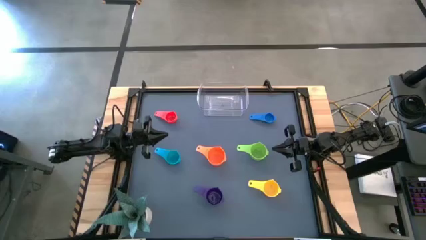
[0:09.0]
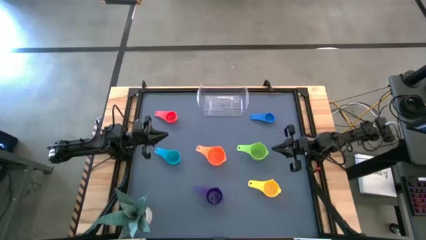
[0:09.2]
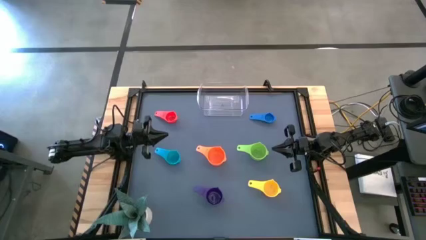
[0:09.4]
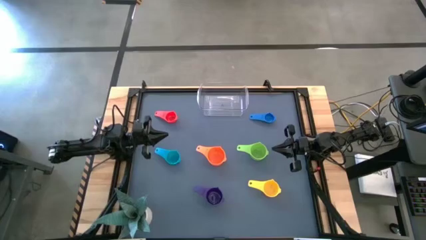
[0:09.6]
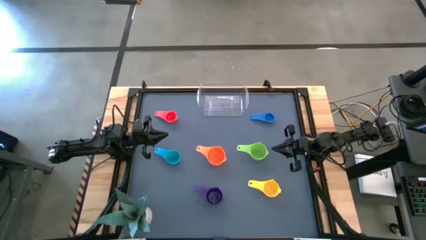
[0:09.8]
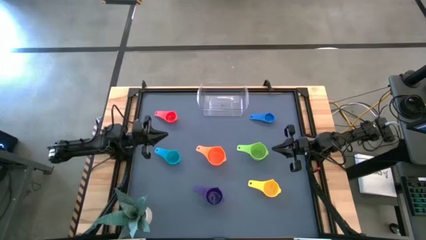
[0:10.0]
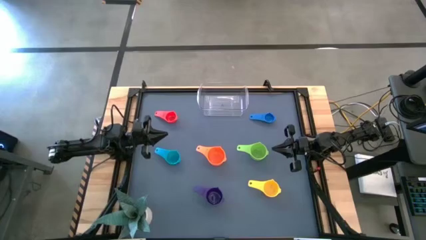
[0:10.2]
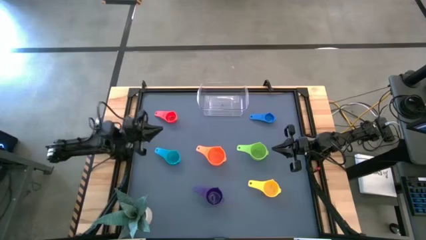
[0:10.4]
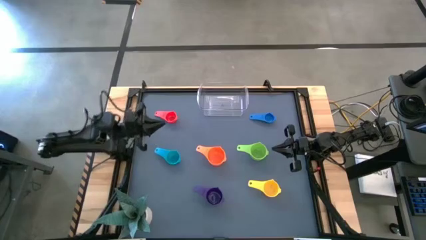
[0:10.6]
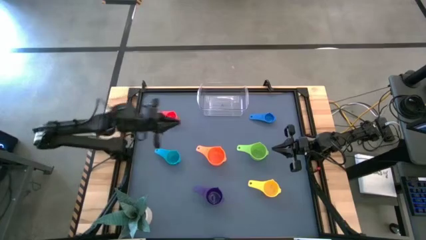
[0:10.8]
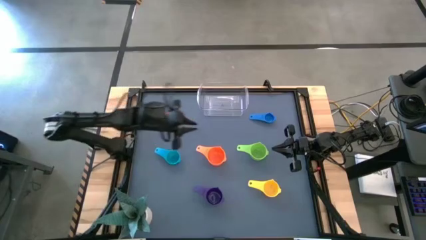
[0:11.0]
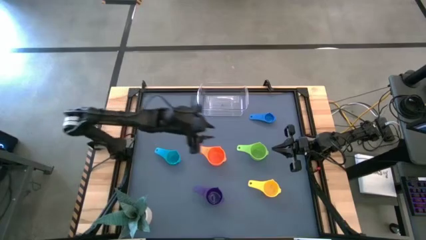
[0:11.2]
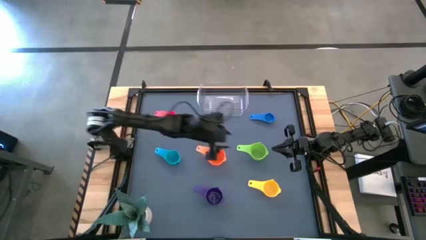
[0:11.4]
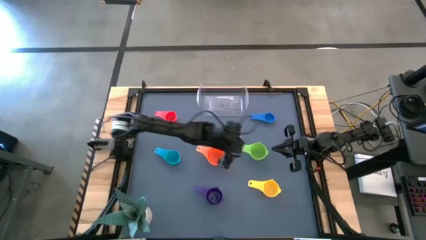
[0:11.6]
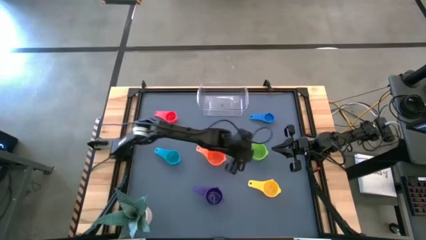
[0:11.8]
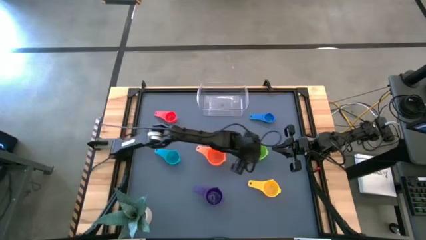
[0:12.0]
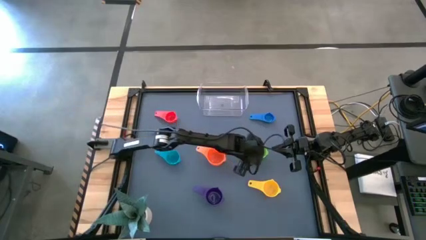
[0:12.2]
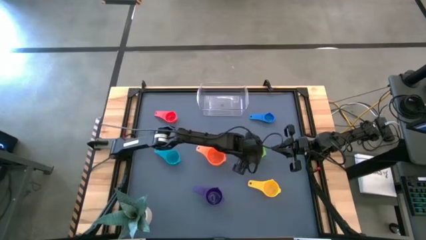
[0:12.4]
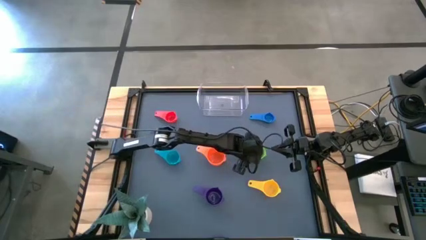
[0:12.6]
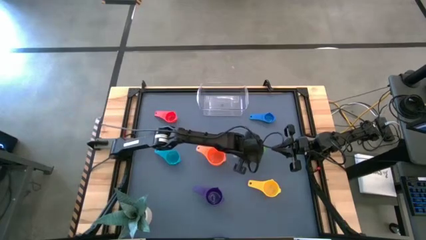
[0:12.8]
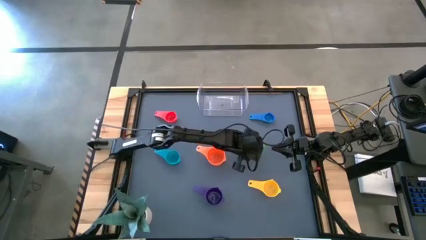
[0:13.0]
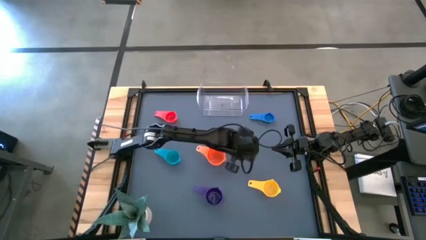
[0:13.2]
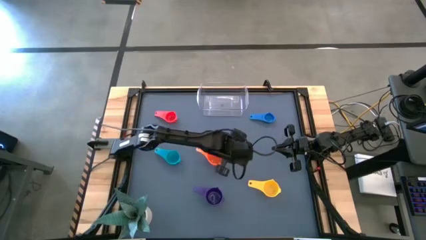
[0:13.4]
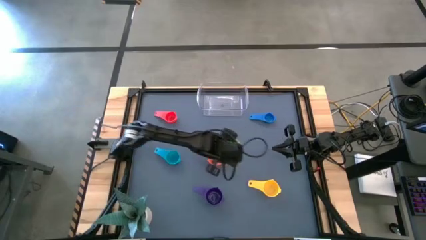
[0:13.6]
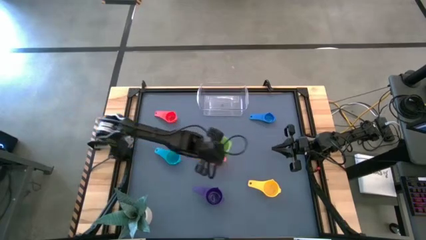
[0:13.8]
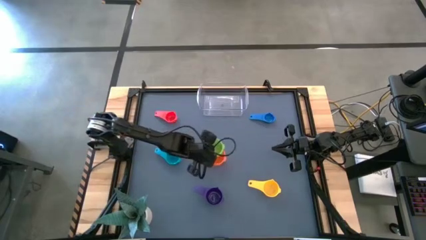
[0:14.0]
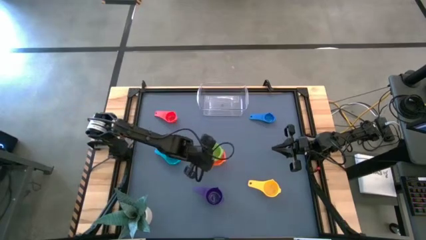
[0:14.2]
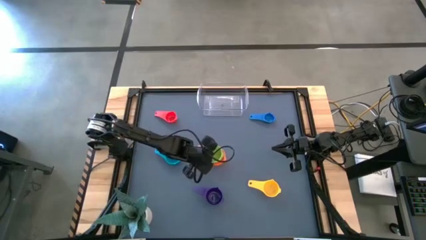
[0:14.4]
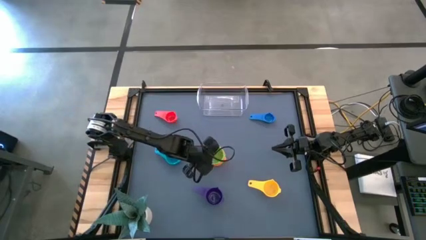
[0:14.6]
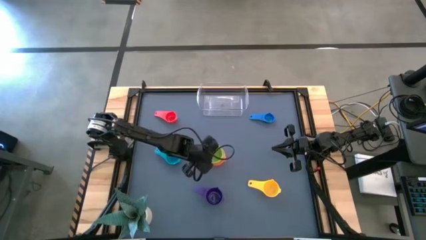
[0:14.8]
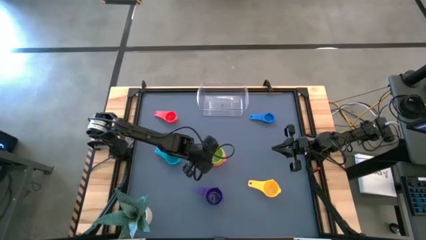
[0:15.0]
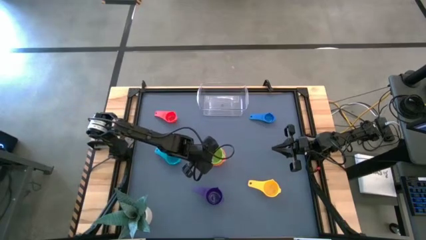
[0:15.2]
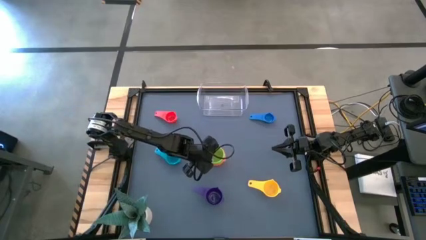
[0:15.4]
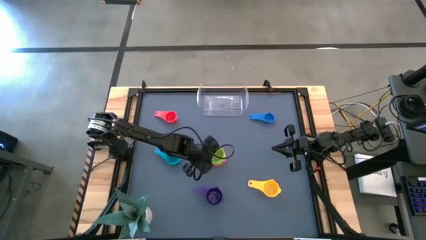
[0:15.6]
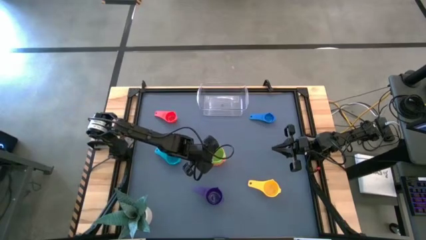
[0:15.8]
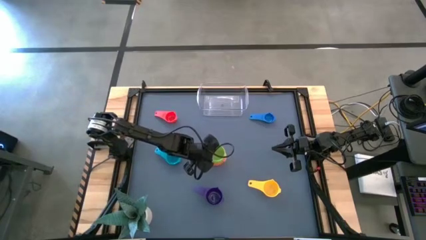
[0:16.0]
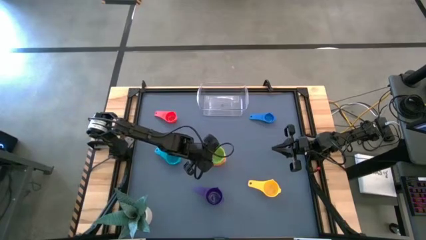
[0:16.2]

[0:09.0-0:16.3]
Task: Nest measuring cups in basket
Stack the green measuring cup on top of the orange measuring cup

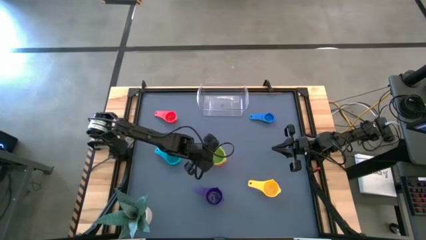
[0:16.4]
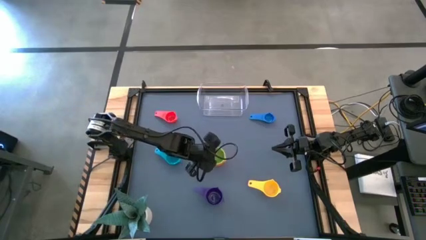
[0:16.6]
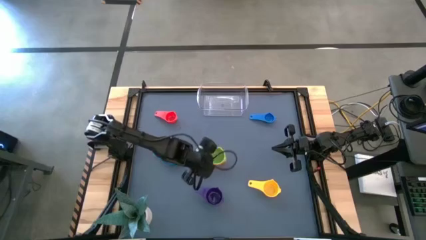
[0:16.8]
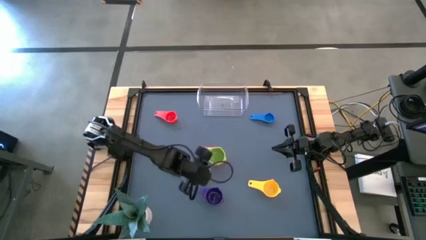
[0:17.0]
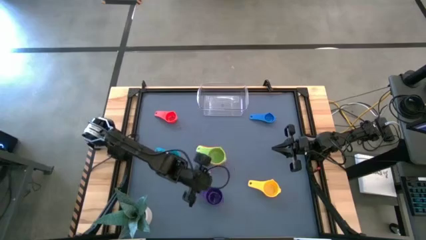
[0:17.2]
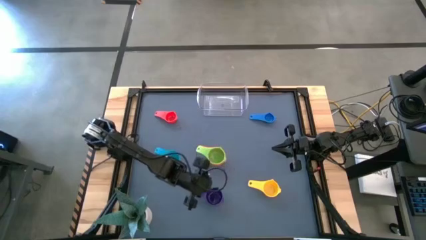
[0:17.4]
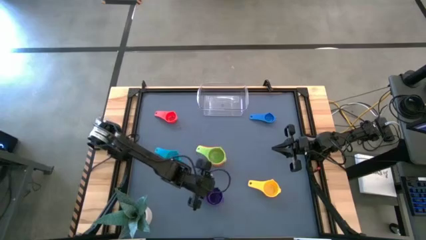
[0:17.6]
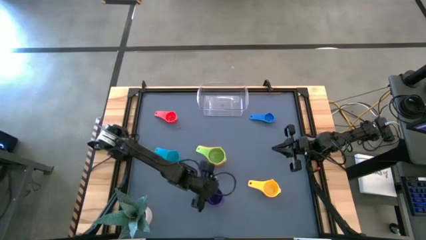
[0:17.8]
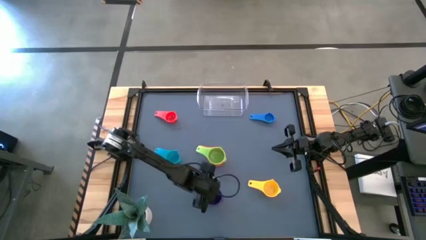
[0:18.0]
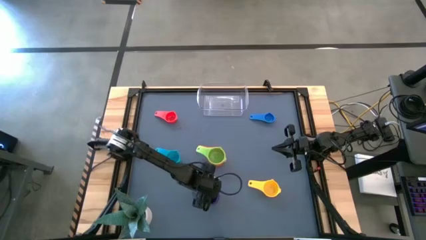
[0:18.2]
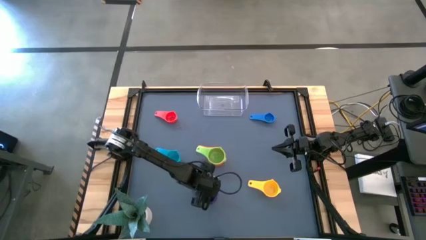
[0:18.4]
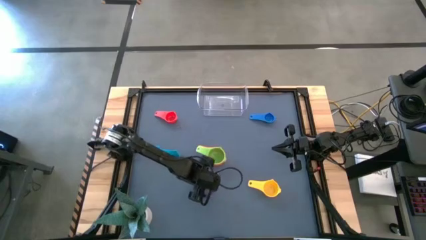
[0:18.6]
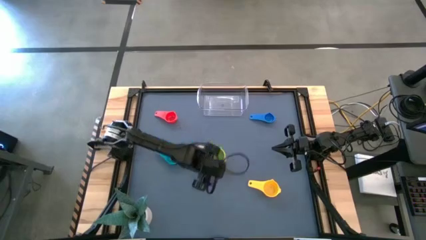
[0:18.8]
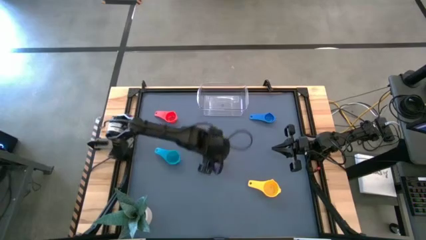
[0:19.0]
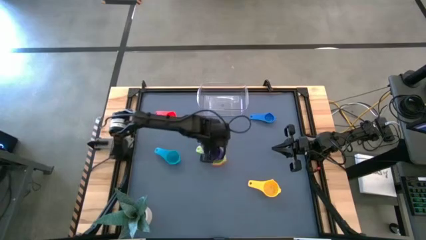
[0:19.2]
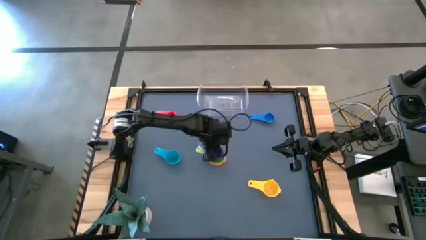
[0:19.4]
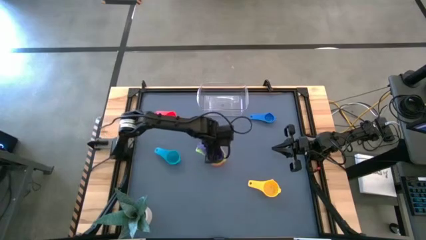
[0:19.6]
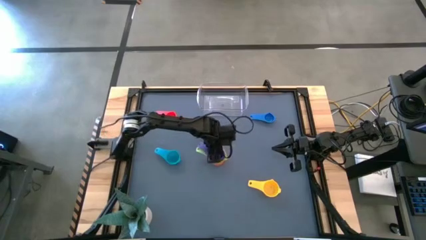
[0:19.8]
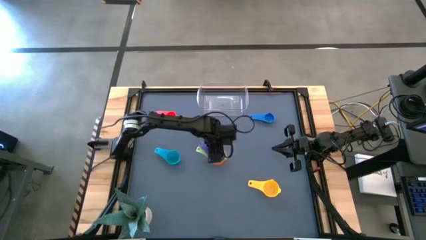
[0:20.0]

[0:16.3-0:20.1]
Stack the violet measuring cup on top of the green measuring cup

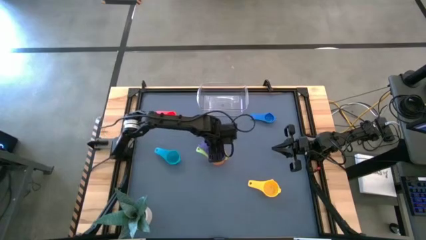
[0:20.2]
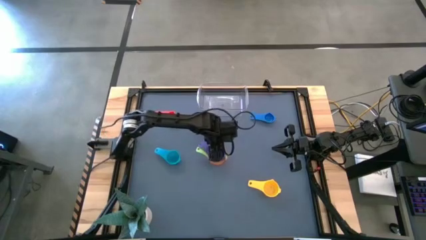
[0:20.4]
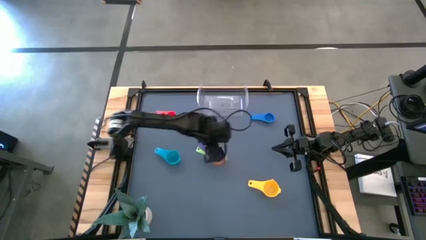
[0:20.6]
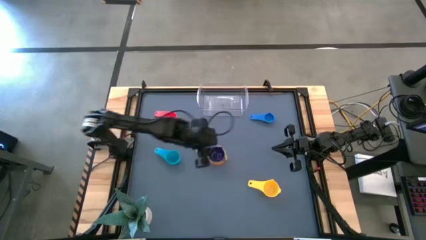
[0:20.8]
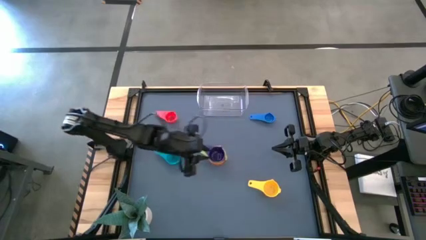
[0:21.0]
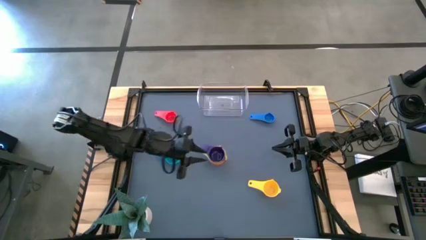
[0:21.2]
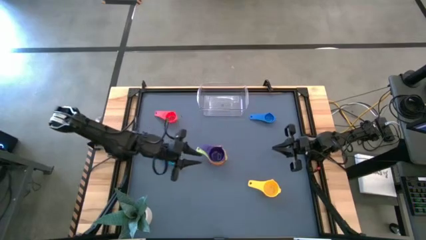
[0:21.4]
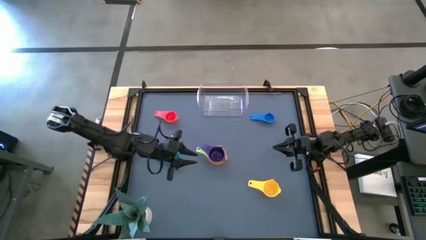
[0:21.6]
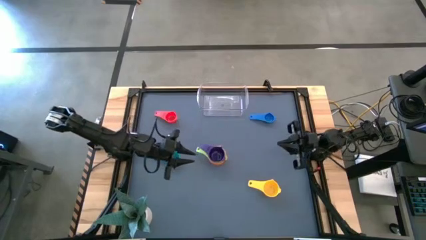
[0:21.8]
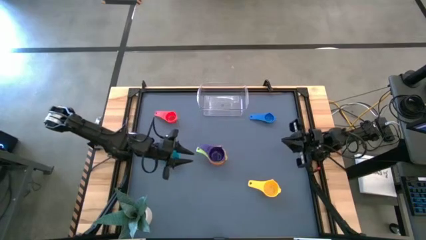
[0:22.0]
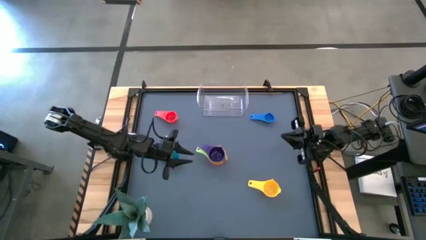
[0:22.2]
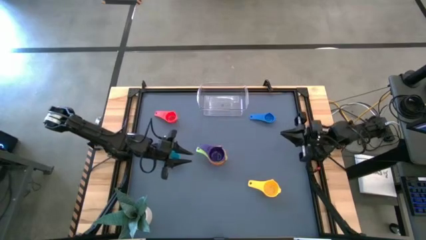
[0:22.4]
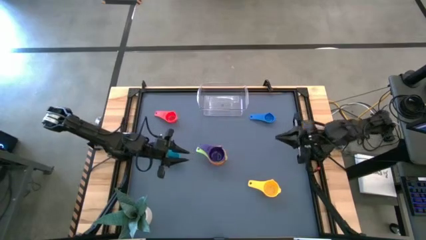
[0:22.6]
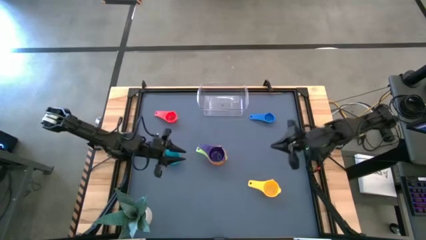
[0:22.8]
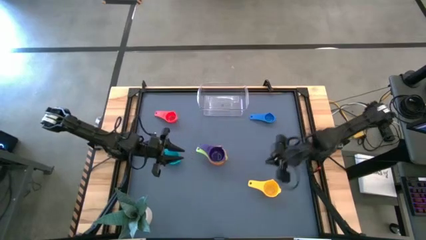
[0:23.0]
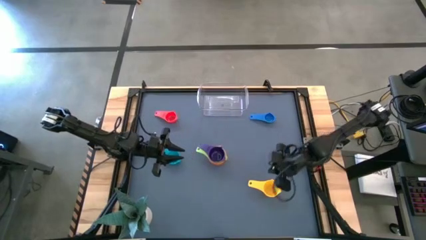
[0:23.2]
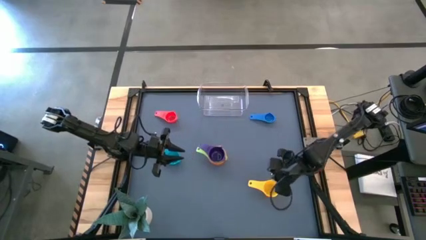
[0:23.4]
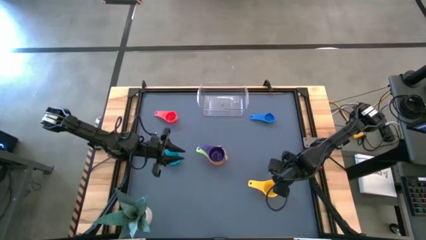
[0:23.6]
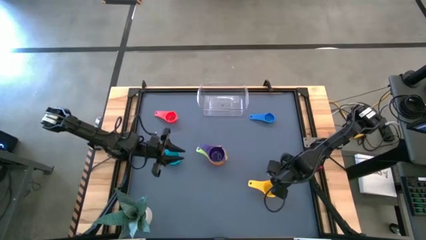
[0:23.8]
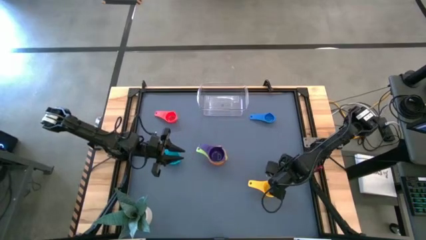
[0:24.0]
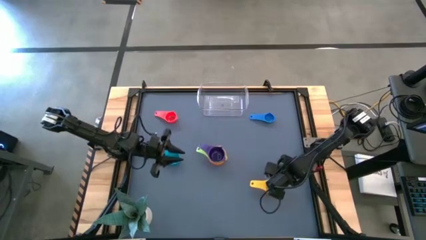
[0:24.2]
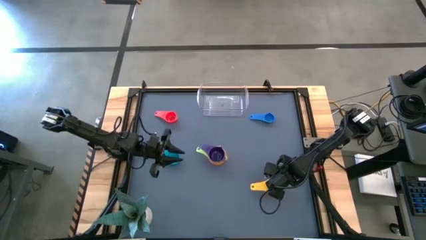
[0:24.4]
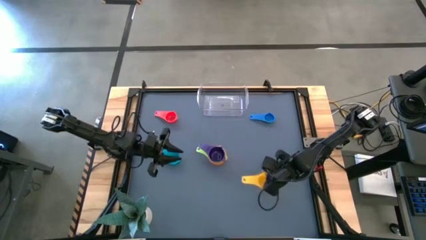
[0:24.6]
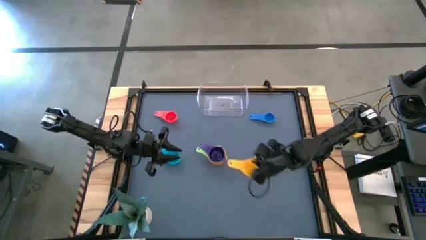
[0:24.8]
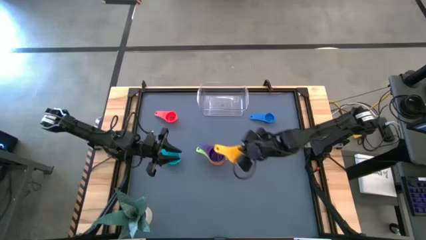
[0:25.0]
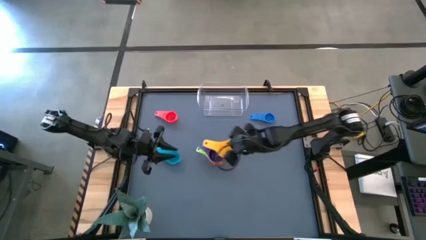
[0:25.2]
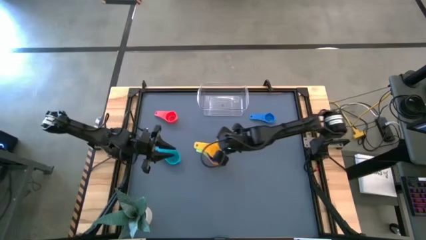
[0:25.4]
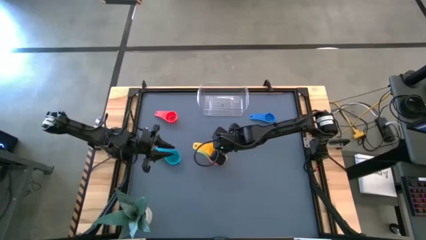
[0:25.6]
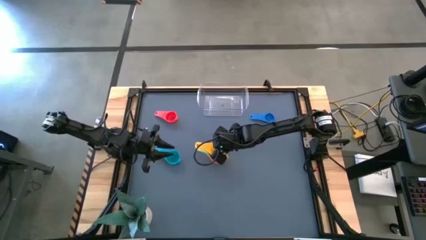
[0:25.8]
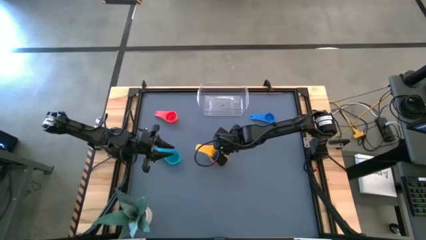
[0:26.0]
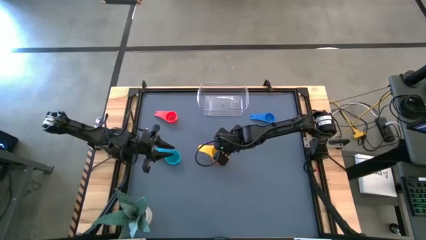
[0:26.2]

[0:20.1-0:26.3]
Stack the yellow measuring cup on top of the violet measuring cup
